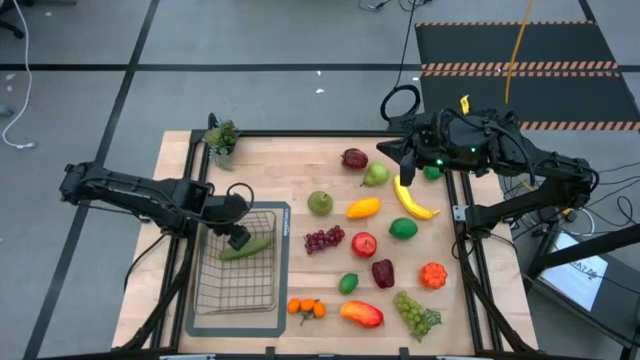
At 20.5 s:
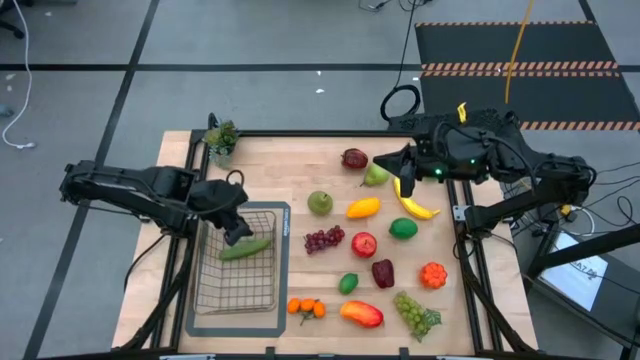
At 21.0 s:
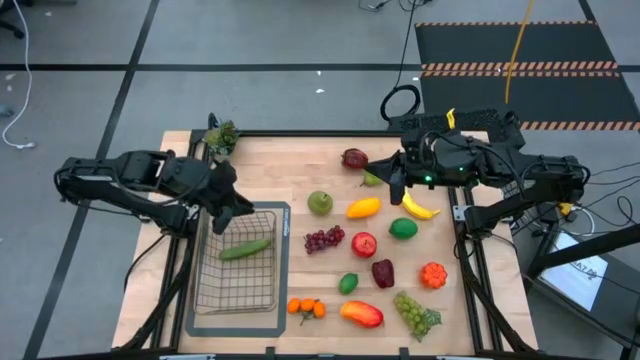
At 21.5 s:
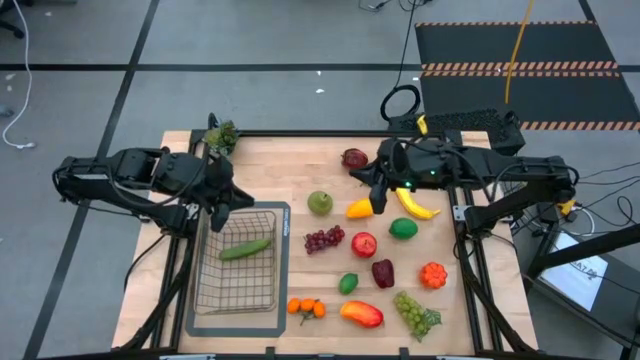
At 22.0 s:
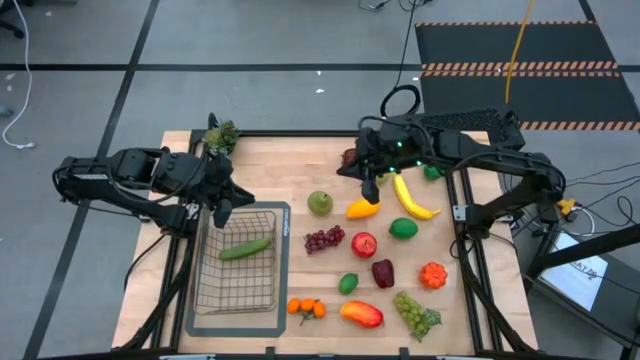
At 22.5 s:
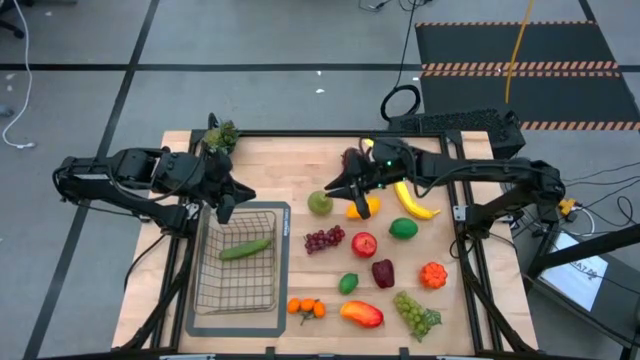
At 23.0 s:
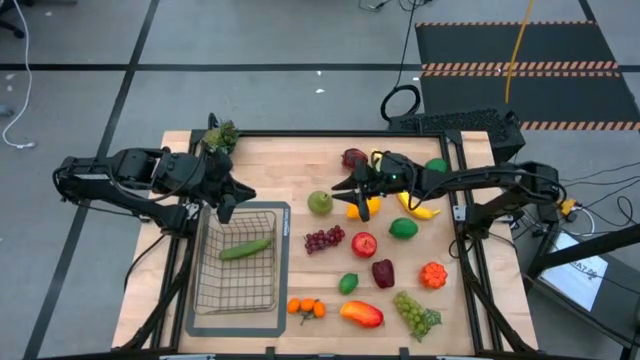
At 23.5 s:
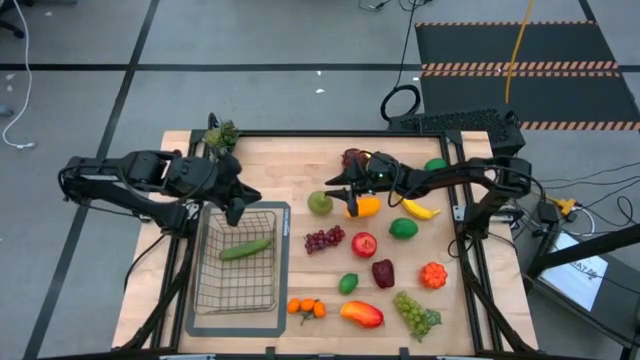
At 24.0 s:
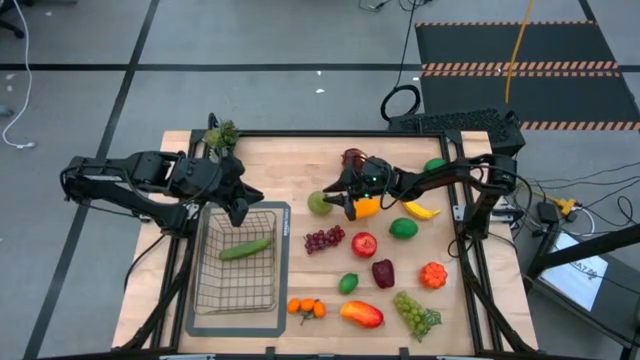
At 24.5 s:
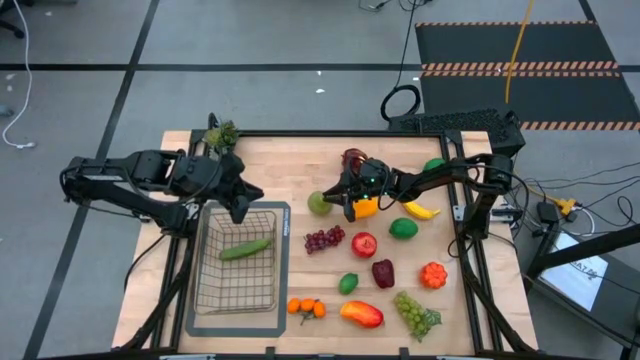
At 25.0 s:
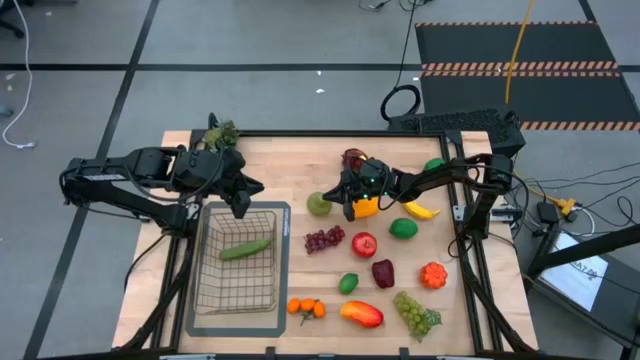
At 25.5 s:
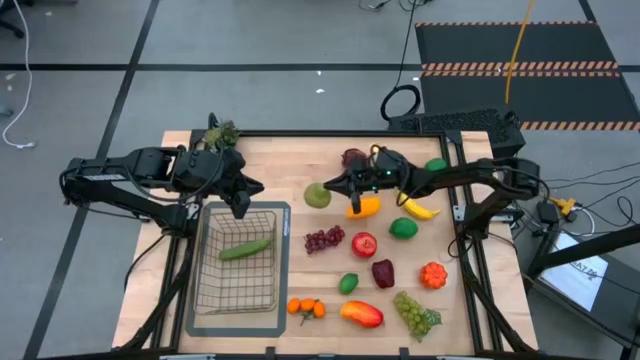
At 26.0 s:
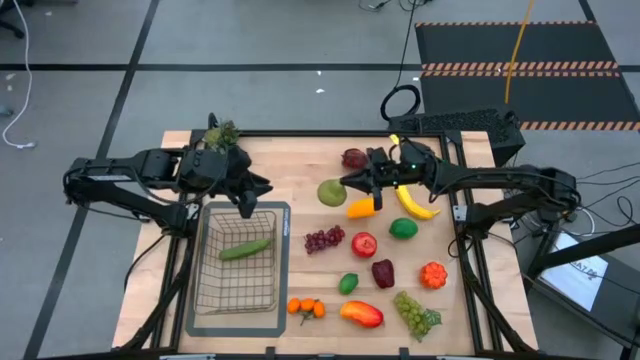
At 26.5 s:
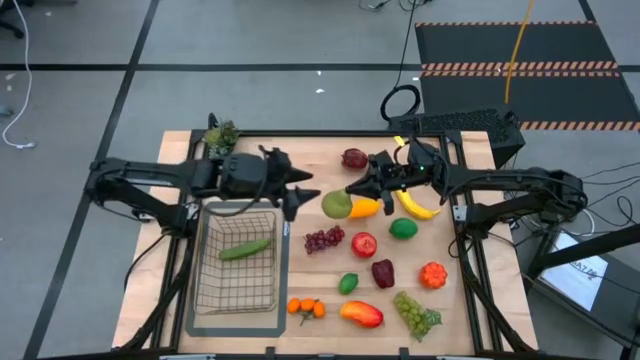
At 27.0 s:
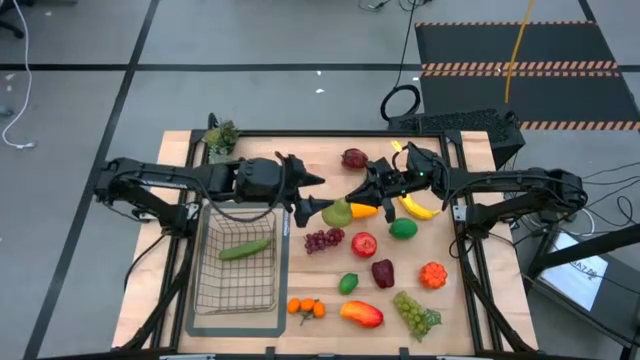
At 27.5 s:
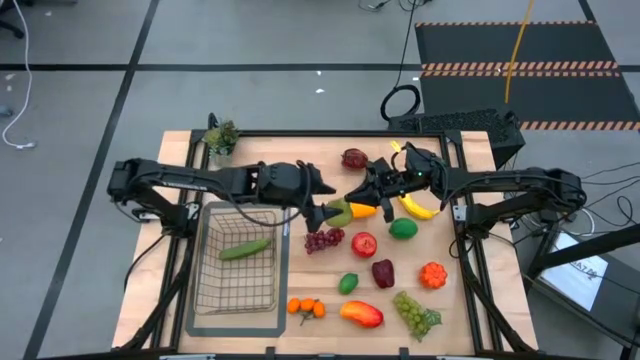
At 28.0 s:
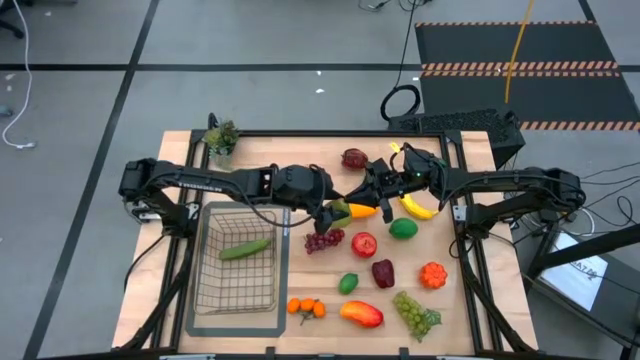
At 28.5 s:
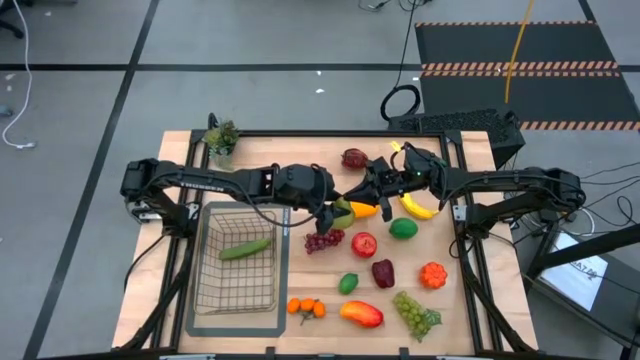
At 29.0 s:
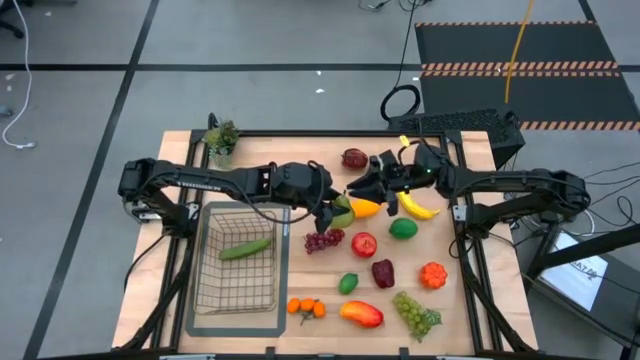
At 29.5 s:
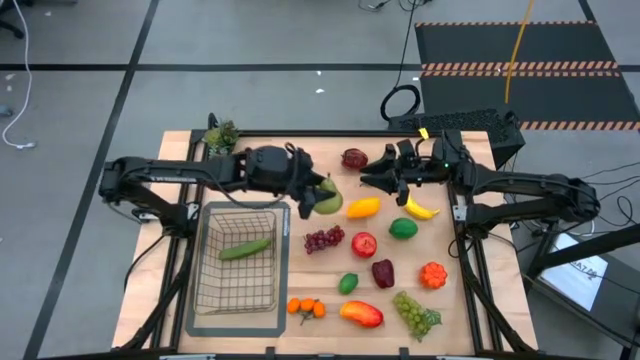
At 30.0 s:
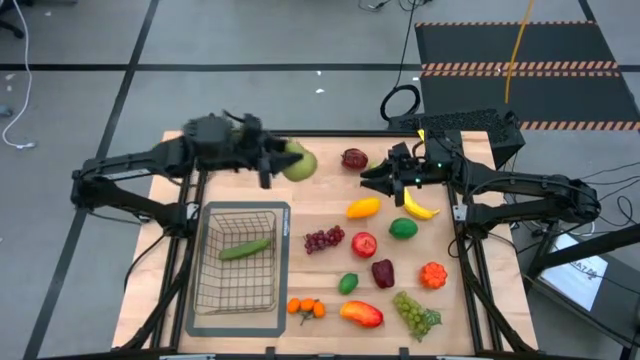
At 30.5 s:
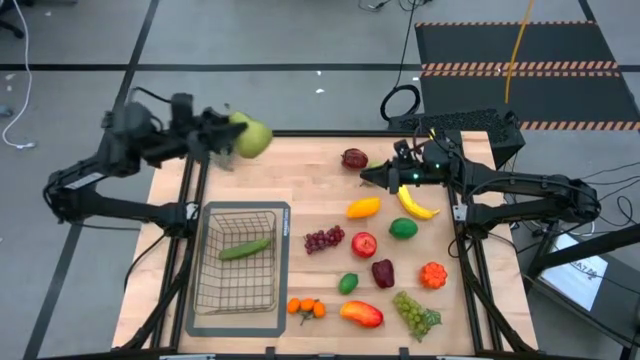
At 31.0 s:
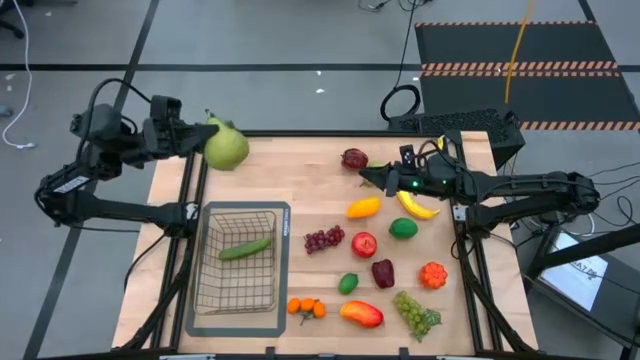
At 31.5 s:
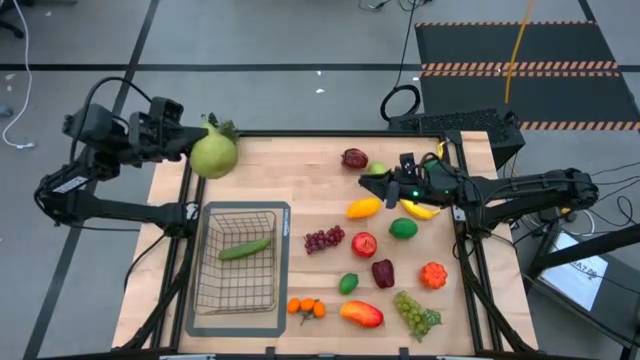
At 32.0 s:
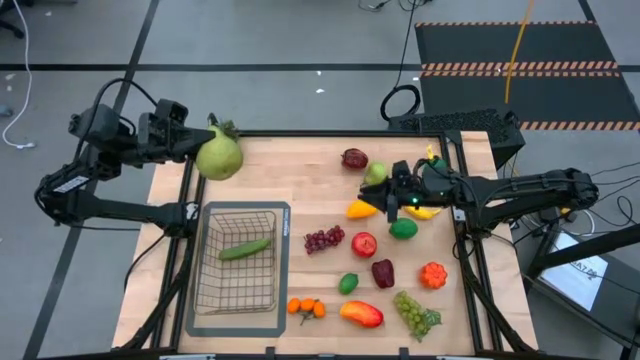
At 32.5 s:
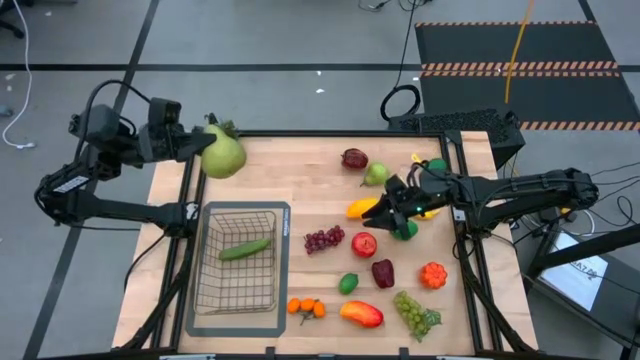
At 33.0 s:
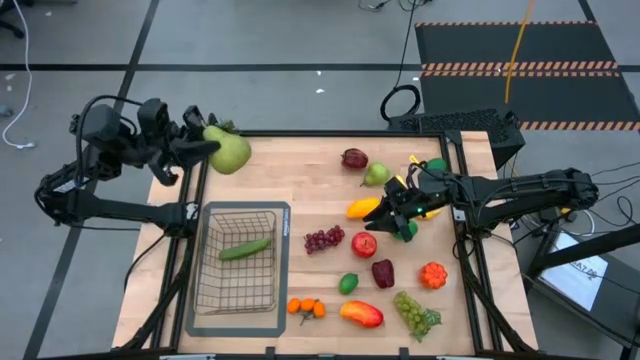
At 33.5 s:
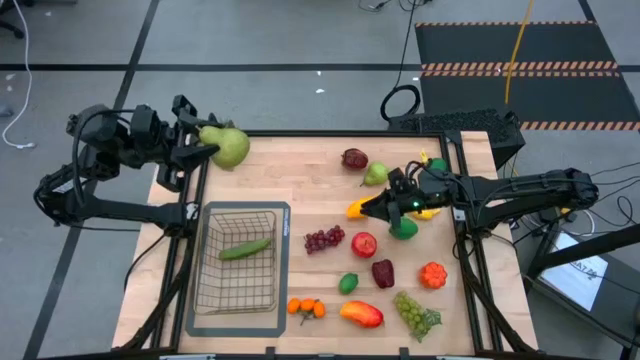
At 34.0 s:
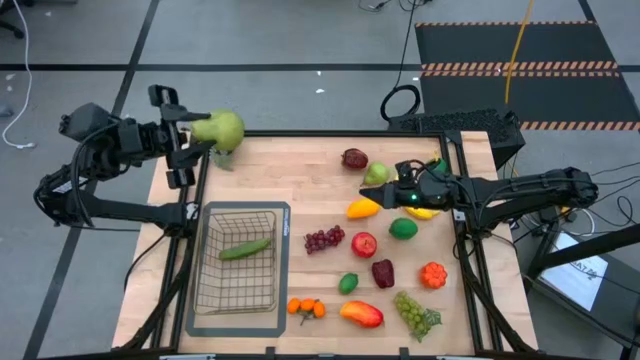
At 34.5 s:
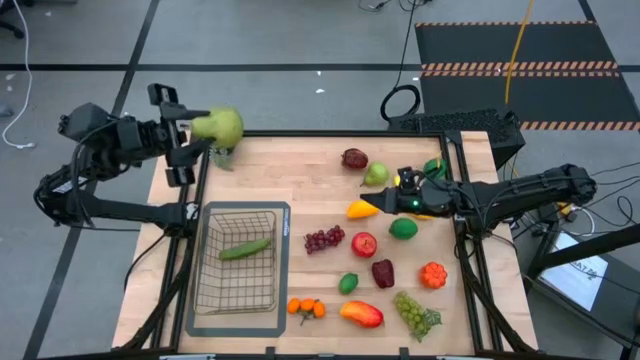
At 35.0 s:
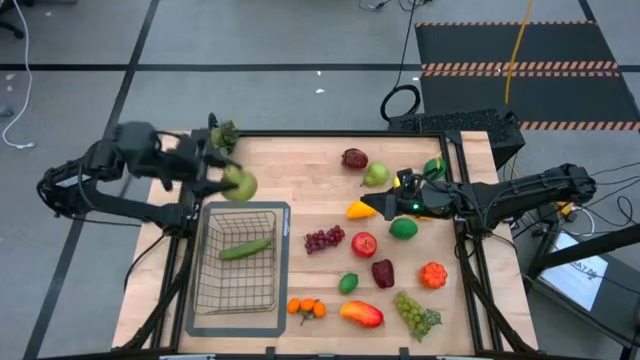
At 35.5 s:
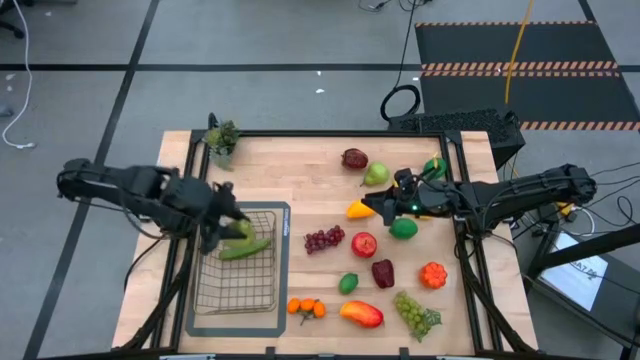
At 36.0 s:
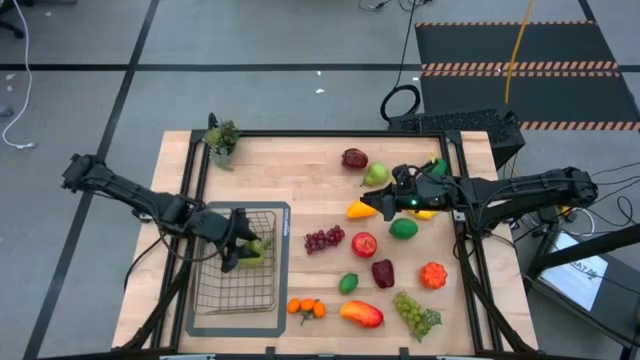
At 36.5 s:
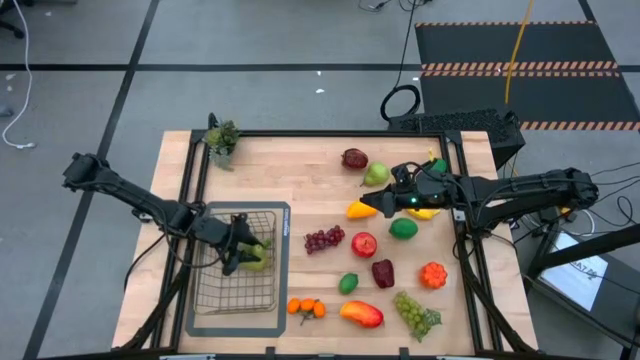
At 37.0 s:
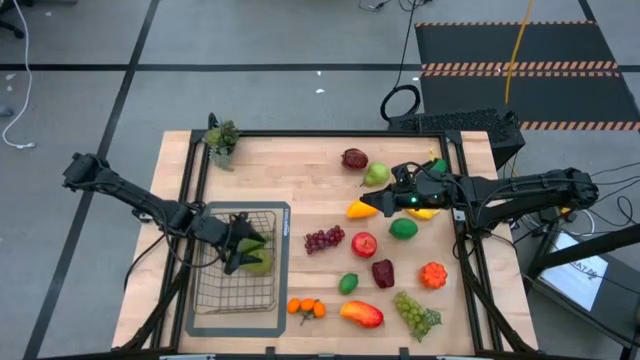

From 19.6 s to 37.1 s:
Task: Build produce basket
Put the left green pear into the wire basket
